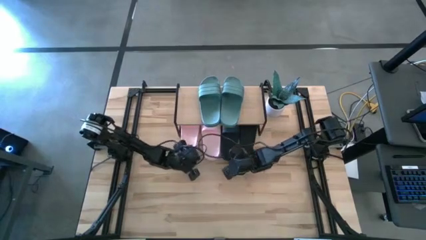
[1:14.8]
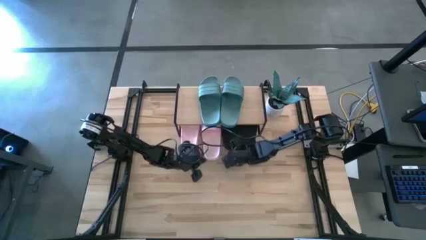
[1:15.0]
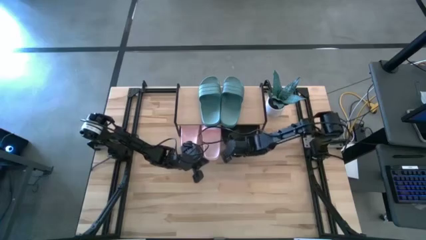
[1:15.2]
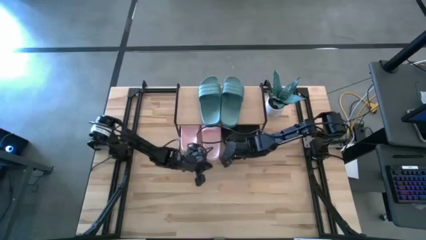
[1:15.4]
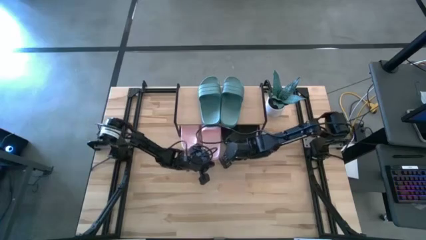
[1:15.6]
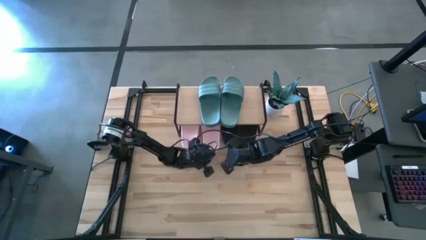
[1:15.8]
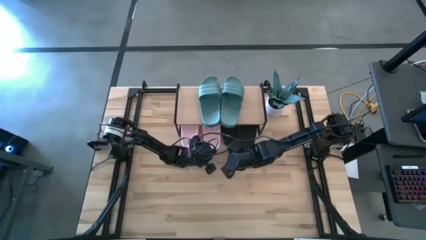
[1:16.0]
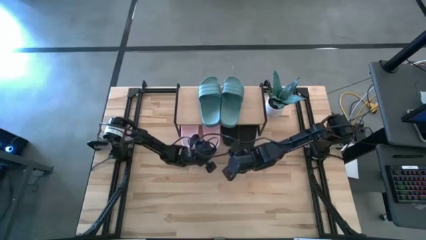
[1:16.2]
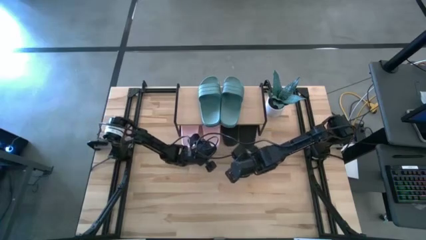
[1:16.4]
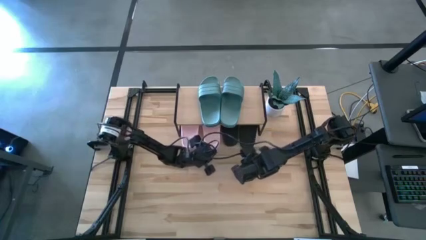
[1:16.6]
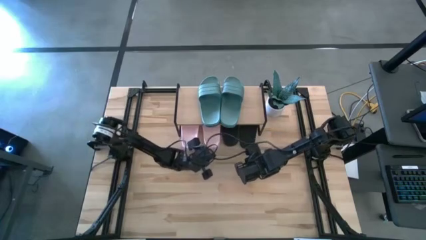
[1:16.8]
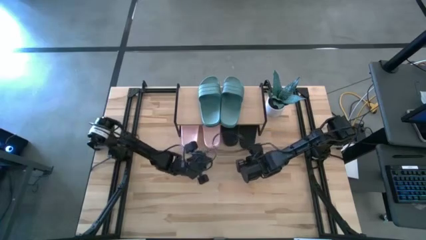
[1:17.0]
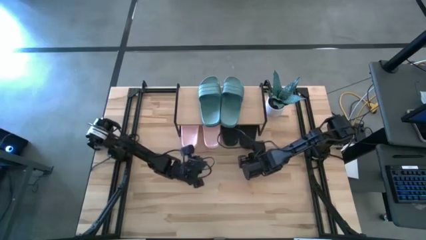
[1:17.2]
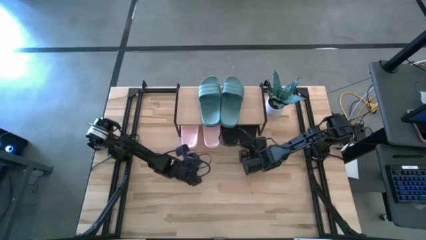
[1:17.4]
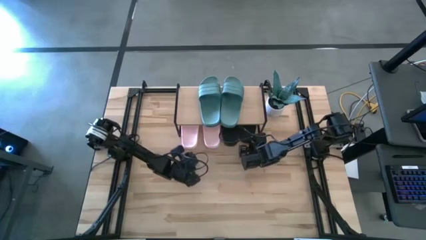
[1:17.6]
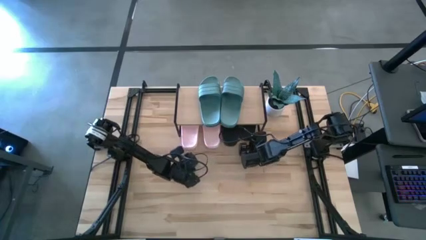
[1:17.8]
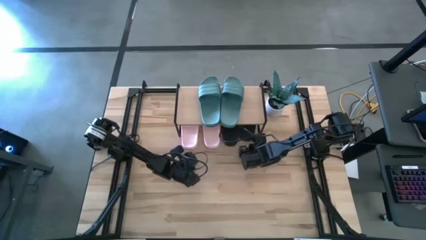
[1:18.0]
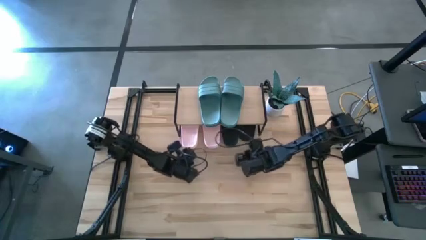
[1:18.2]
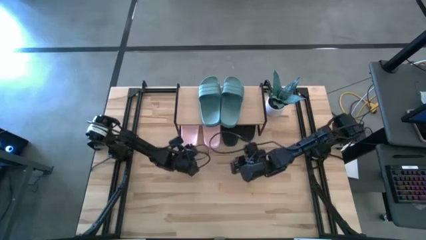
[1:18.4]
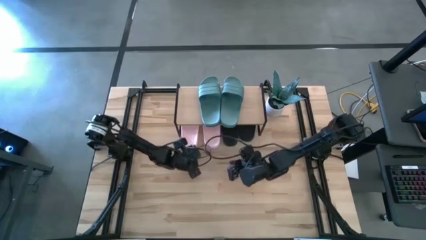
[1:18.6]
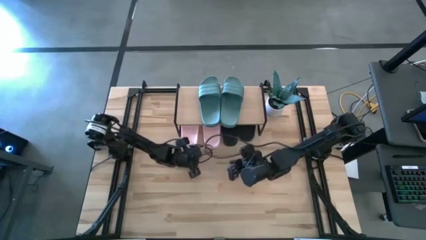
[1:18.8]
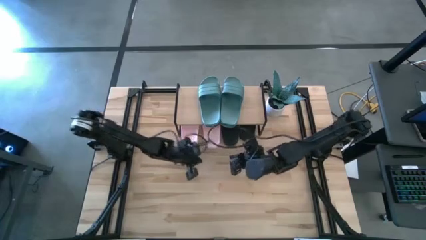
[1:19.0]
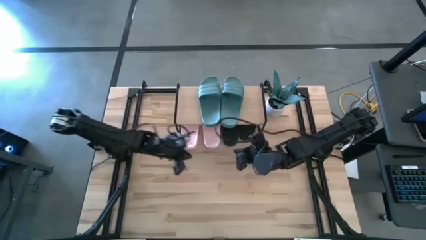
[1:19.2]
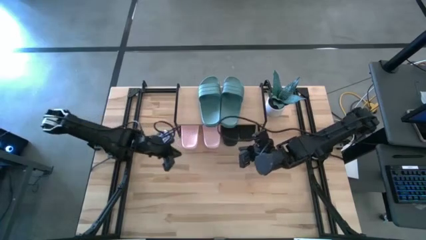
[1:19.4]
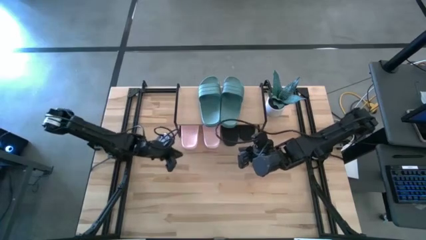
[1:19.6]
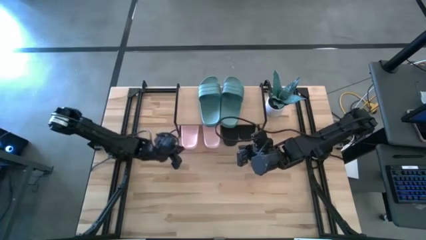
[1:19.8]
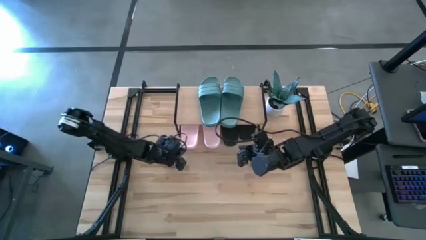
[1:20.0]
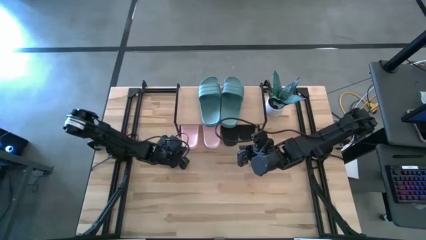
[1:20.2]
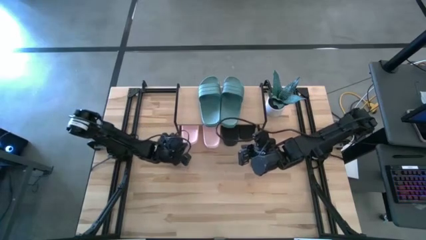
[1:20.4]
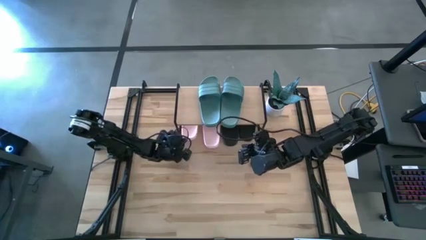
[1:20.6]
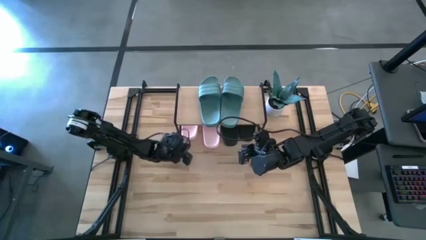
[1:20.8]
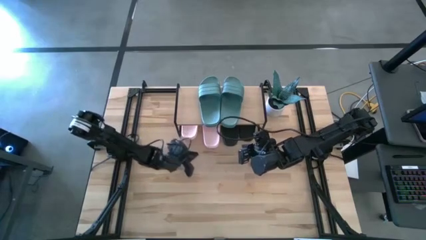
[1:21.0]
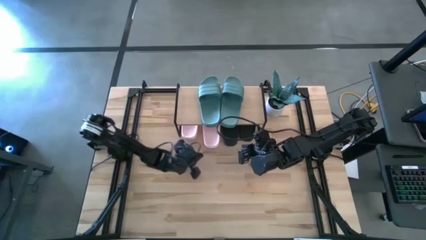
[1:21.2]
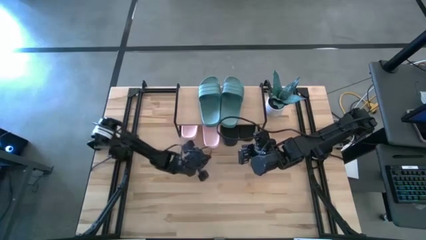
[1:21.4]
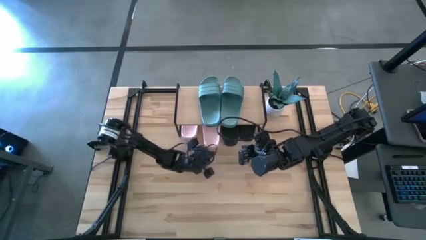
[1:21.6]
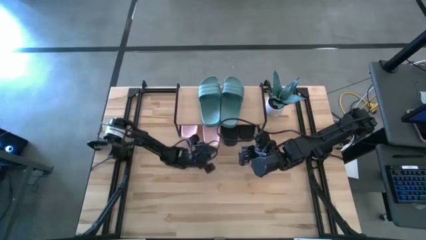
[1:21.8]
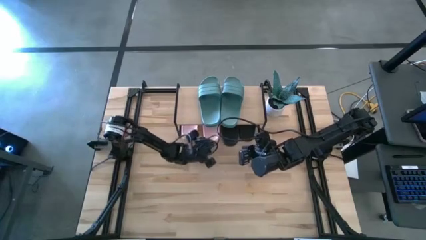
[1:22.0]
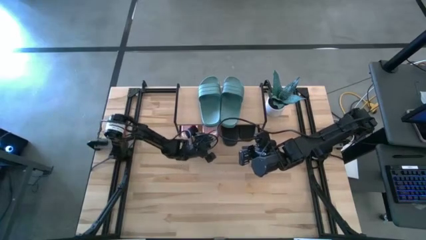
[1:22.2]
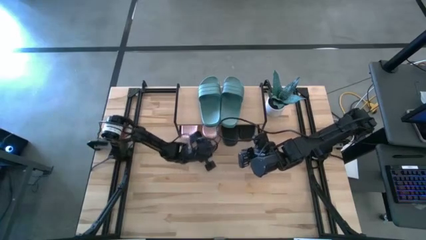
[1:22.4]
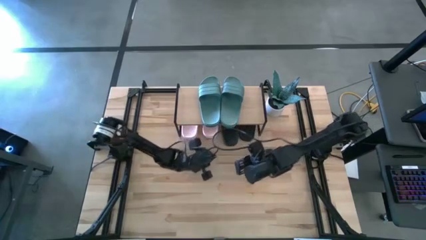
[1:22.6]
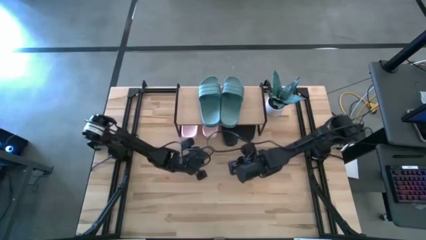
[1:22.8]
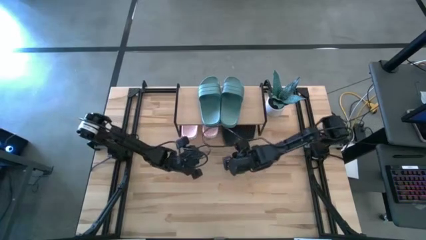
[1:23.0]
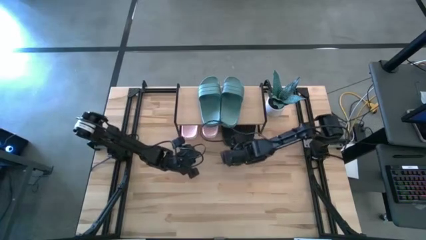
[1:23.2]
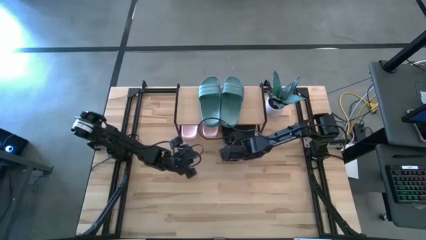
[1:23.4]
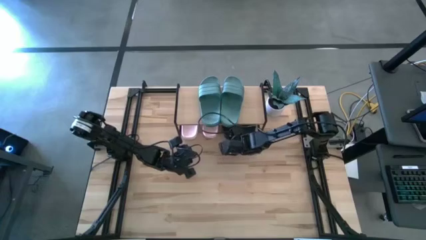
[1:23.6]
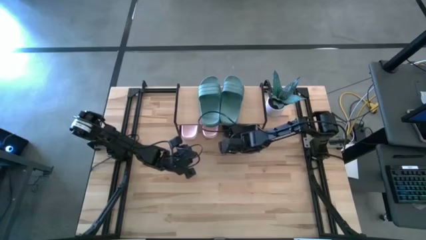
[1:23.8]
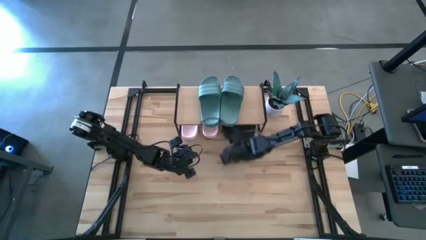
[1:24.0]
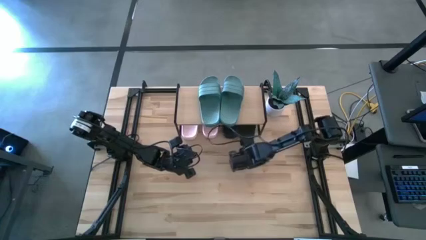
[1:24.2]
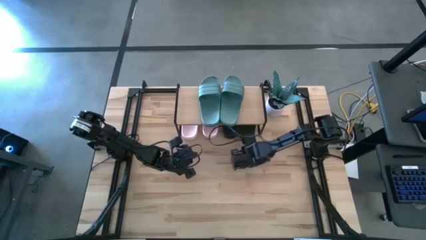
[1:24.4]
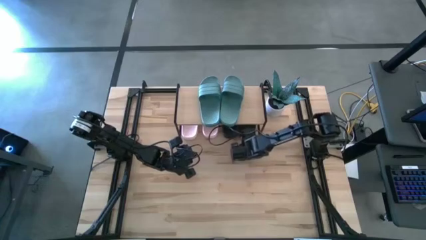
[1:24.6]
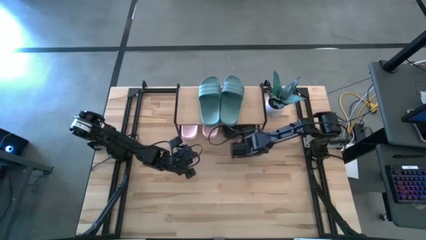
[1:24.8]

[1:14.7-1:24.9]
Task: Pick and place slides into the shelf
Adjust the slides under the shelf

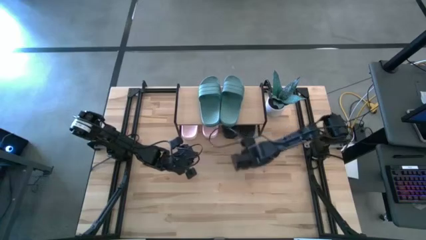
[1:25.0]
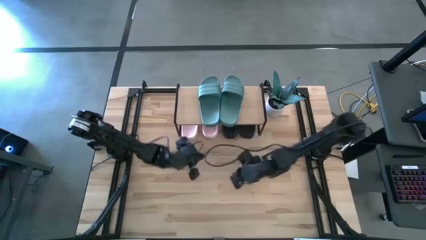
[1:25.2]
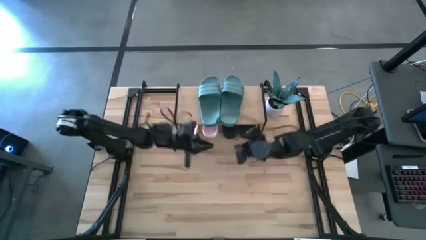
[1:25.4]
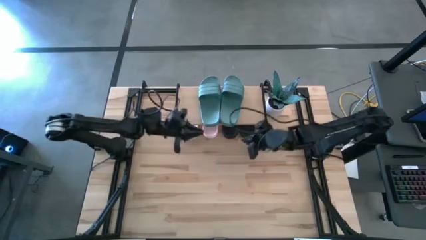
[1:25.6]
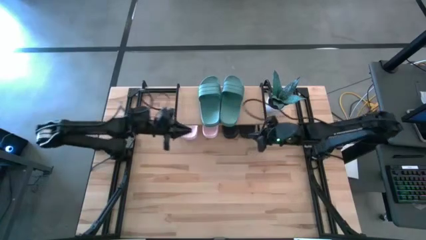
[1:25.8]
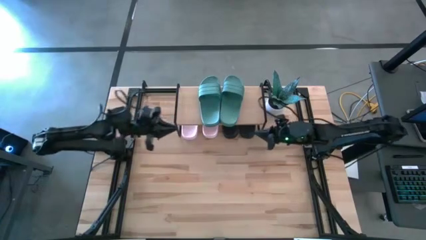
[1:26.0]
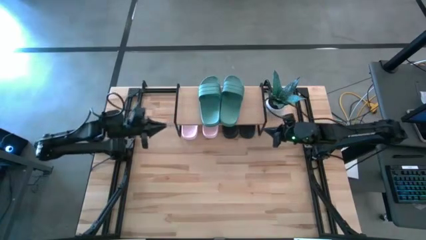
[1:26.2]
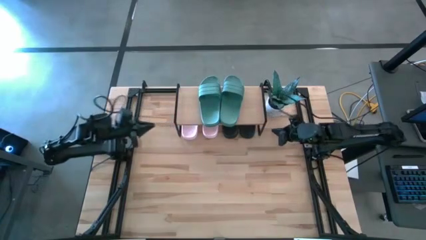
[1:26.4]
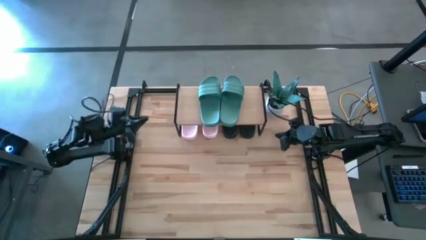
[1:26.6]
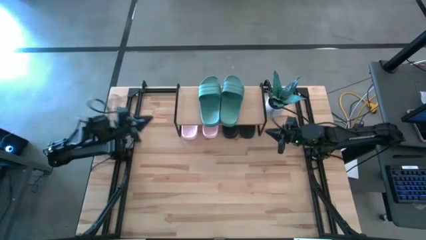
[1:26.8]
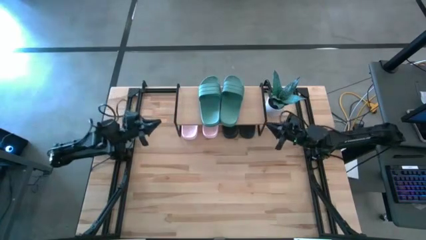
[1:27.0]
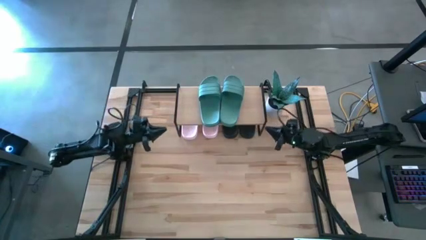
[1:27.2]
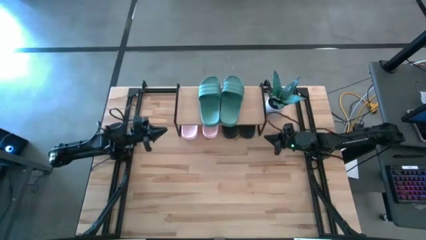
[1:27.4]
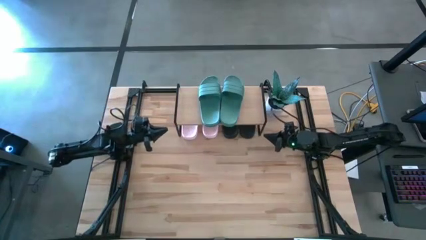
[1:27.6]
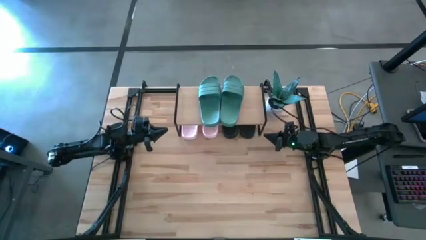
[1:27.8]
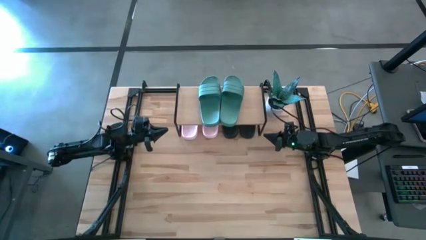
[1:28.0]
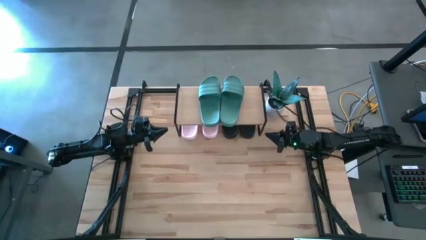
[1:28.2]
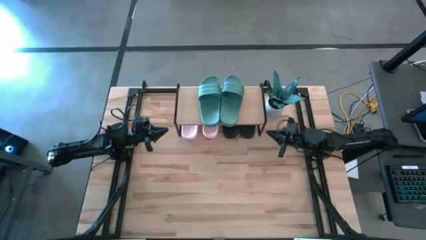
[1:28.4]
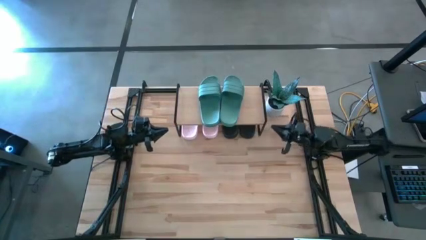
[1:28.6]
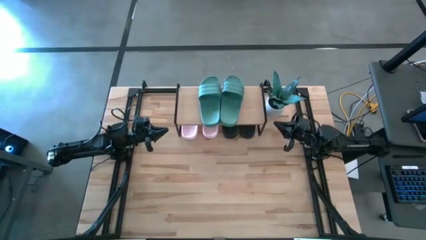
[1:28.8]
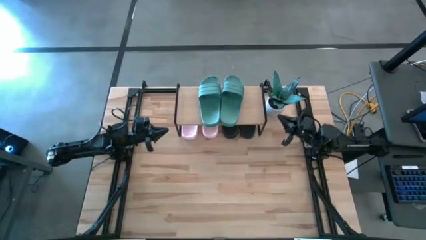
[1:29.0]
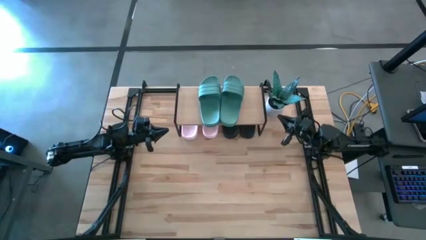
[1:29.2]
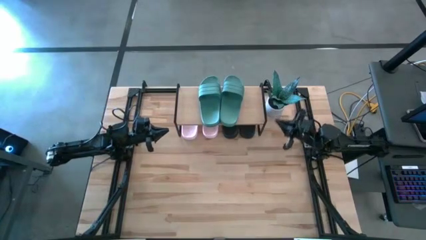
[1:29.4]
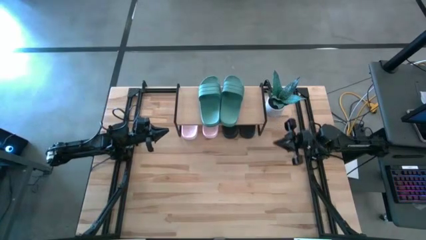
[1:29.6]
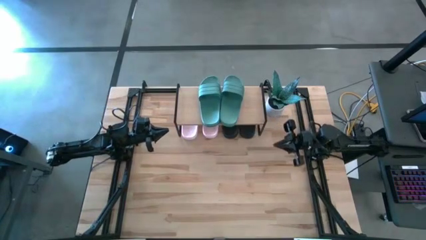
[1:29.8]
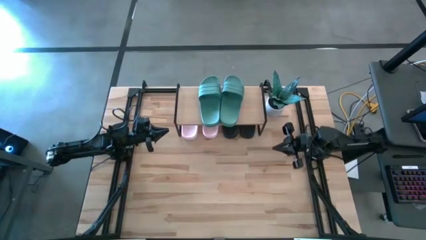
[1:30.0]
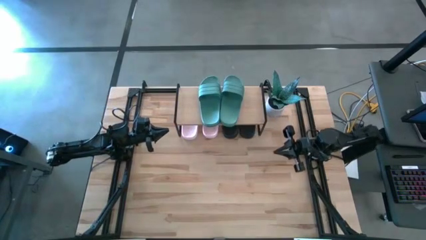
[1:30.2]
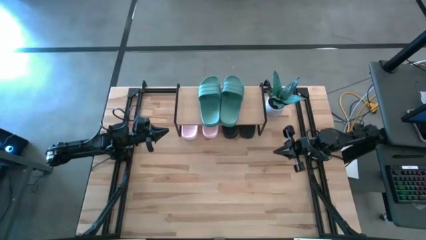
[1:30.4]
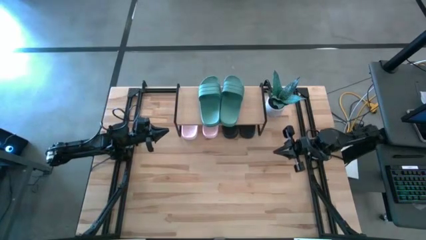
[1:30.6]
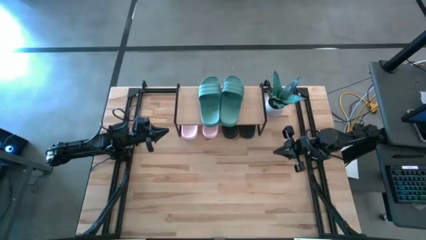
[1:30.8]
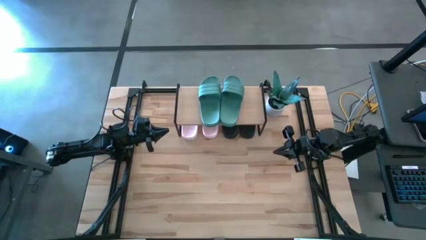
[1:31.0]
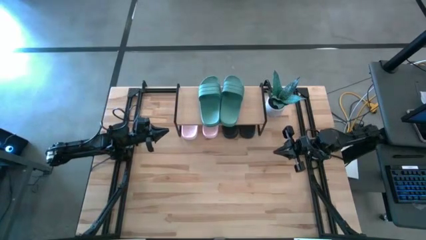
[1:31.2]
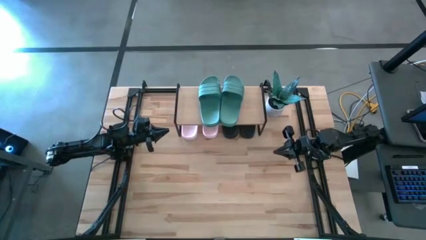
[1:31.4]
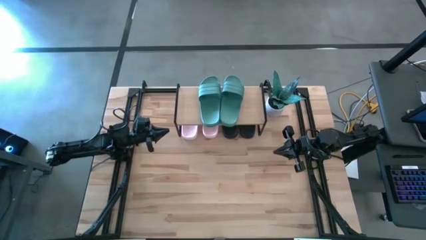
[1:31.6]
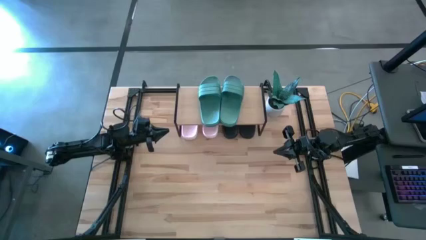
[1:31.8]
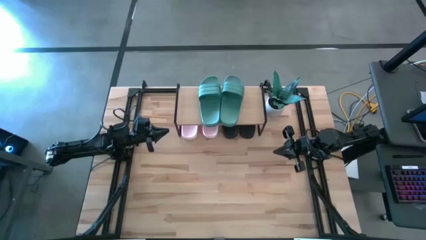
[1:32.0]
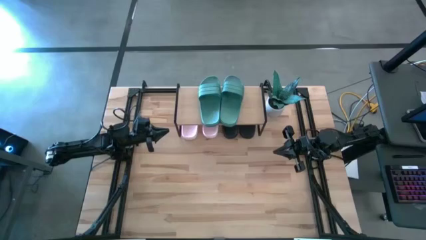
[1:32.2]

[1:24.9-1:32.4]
Return to Home Position
